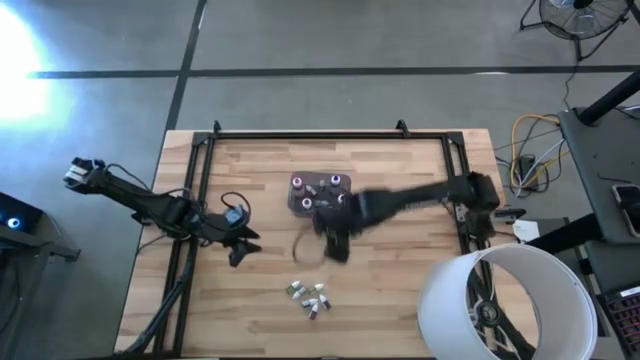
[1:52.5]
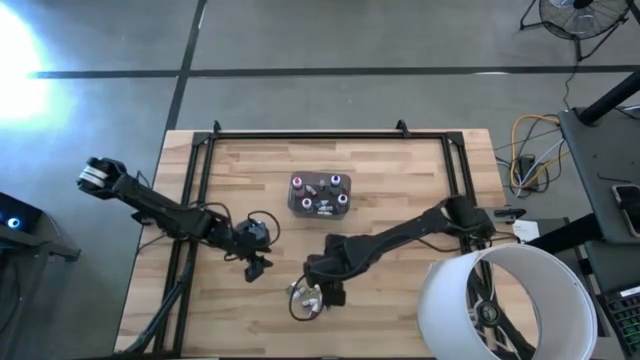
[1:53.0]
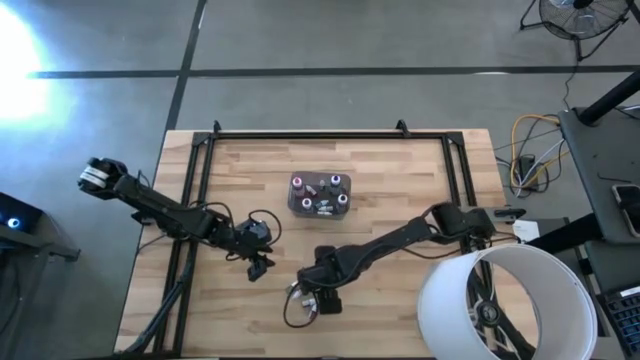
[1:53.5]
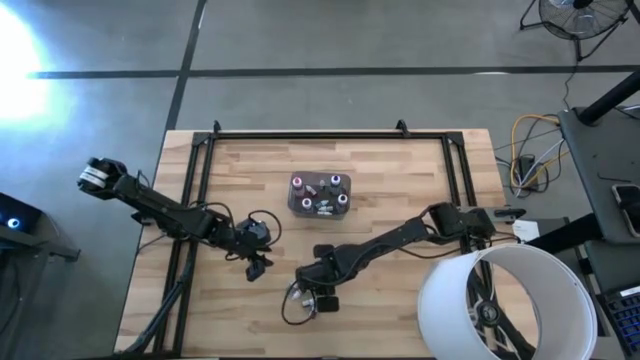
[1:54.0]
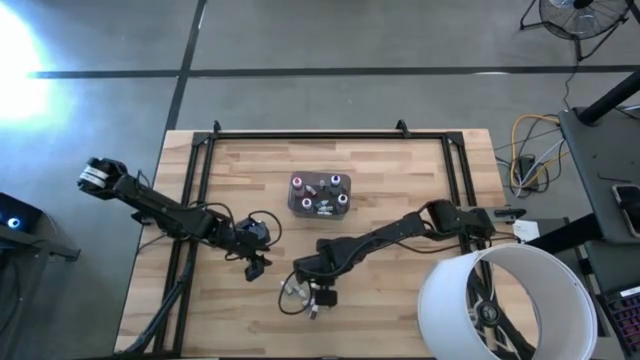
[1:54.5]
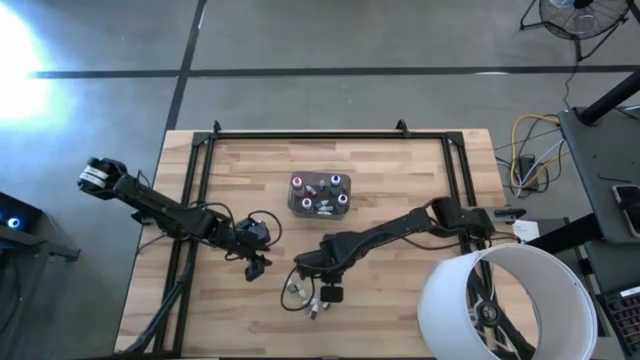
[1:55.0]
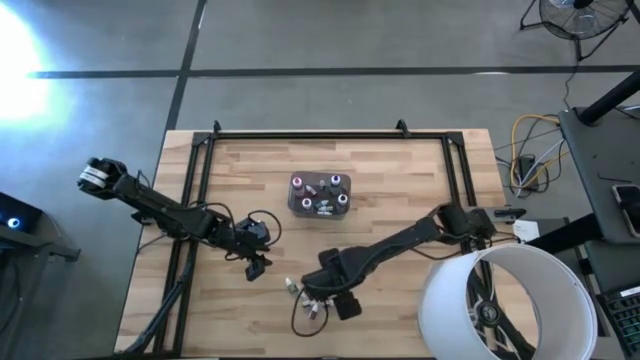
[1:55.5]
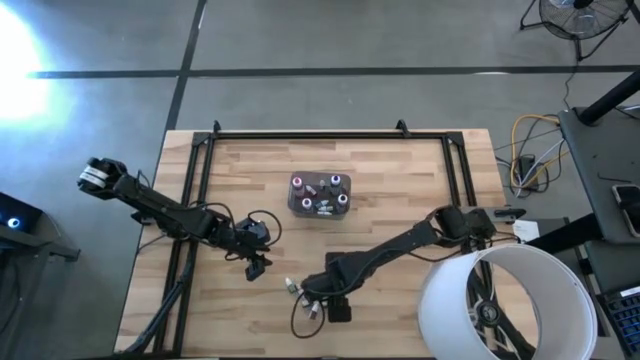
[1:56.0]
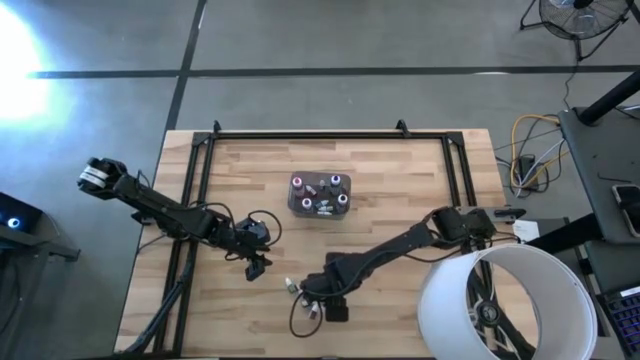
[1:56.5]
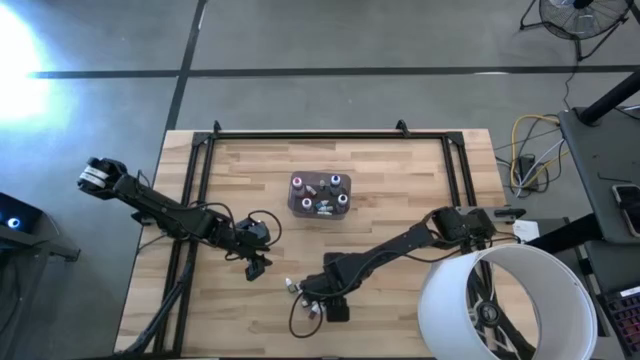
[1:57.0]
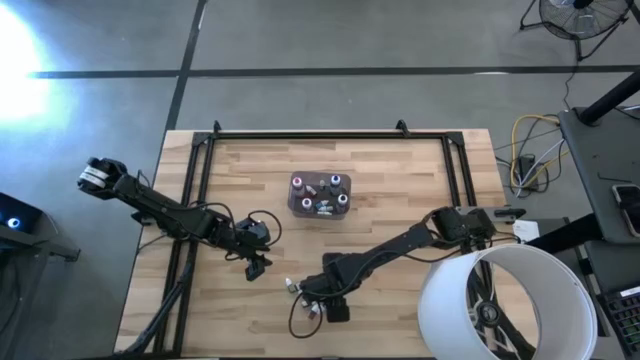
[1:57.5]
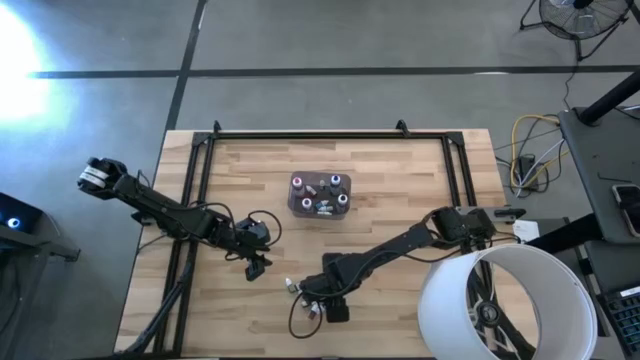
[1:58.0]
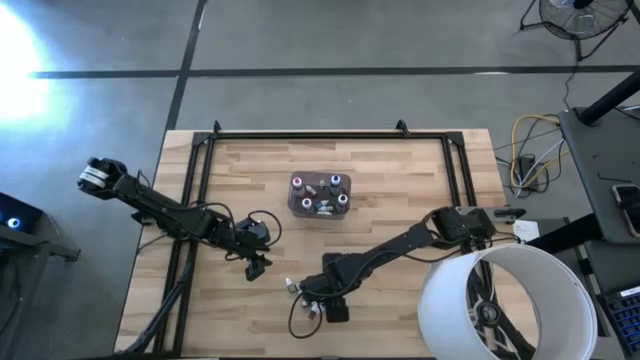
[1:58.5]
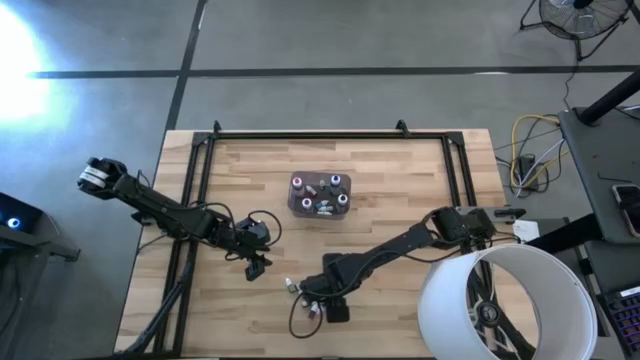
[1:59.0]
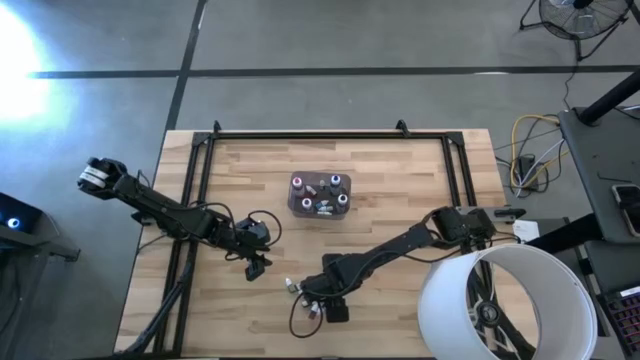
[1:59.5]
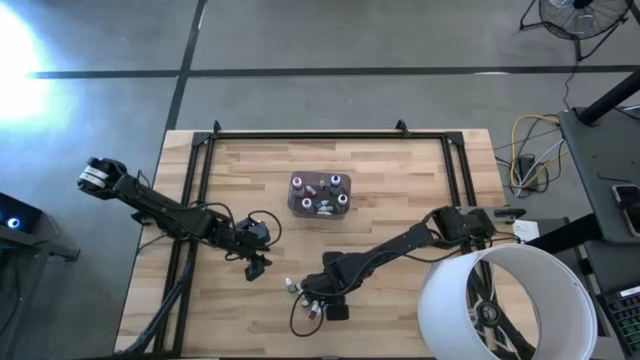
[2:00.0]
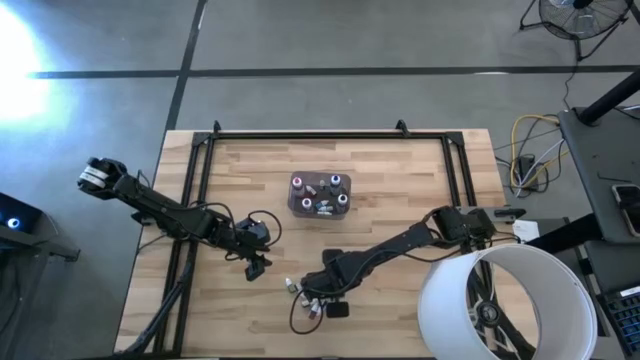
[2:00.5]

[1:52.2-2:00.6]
Task: Pick & Place food coloring
Put the right small green food coloring bottle into the black bin

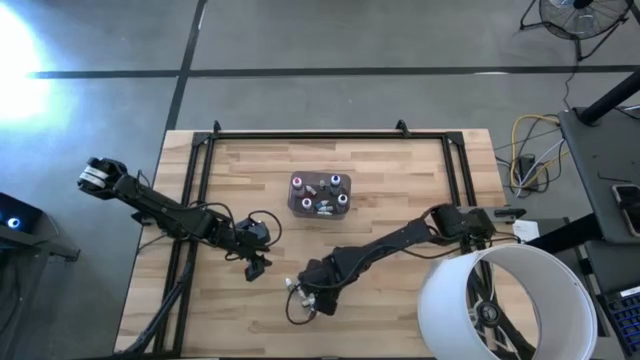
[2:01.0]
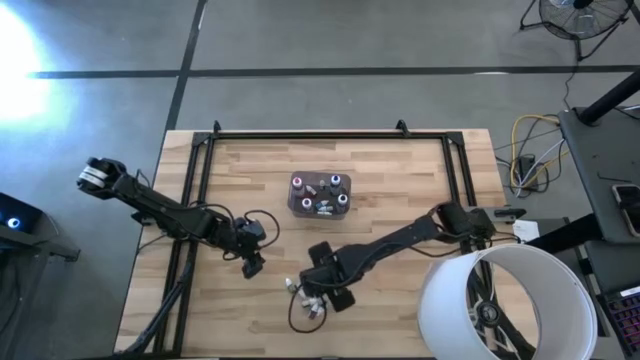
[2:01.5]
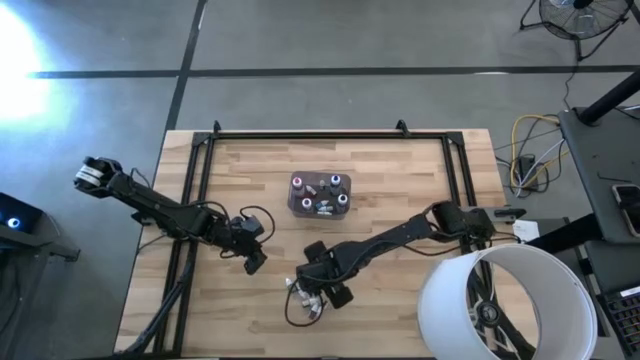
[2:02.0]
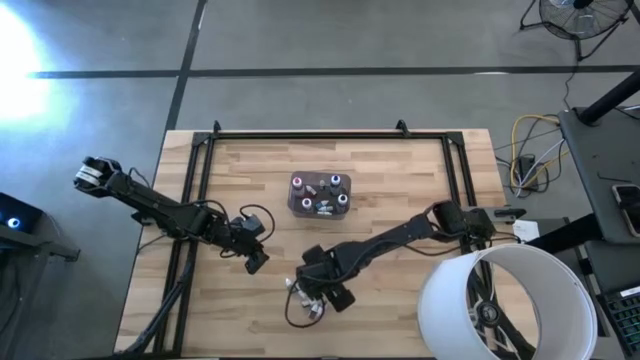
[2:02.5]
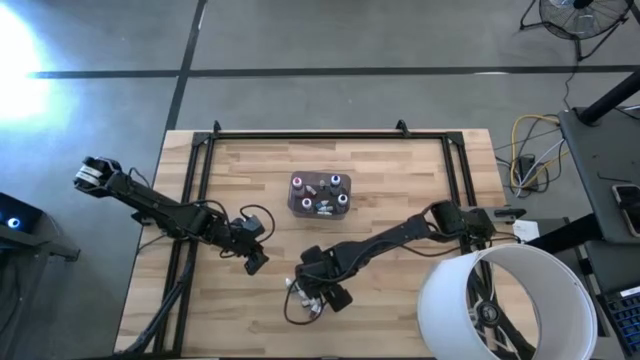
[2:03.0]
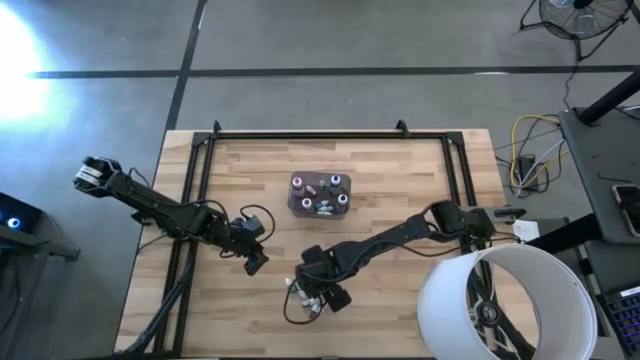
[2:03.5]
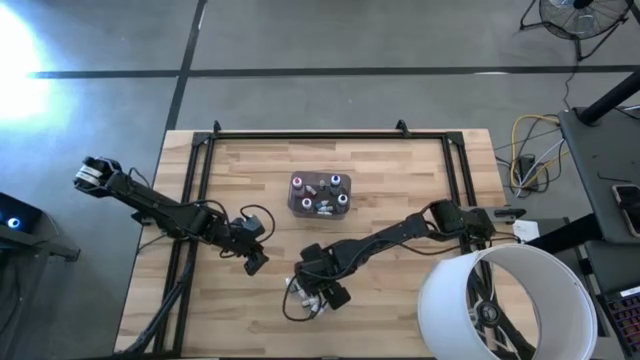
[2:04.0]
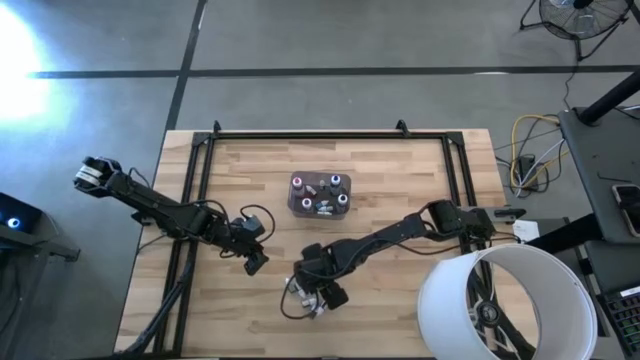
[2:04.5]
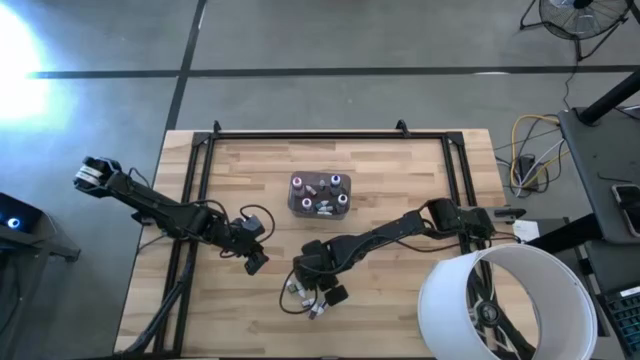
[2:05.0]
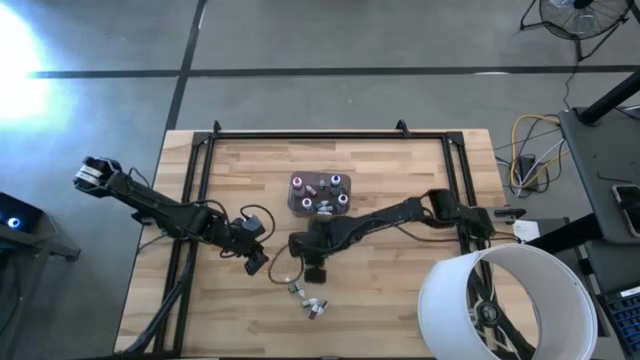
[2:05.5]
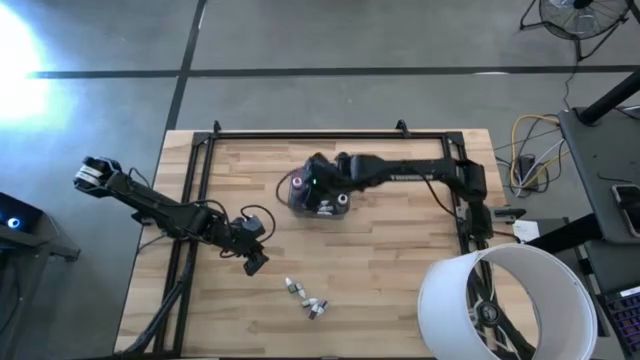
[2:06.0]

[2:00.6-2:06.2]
Put the right small green food coloring bottle into the black bin

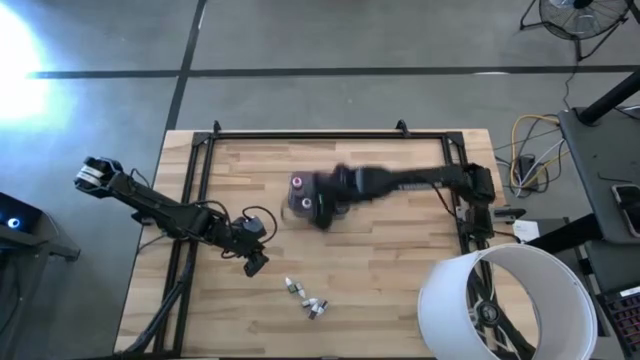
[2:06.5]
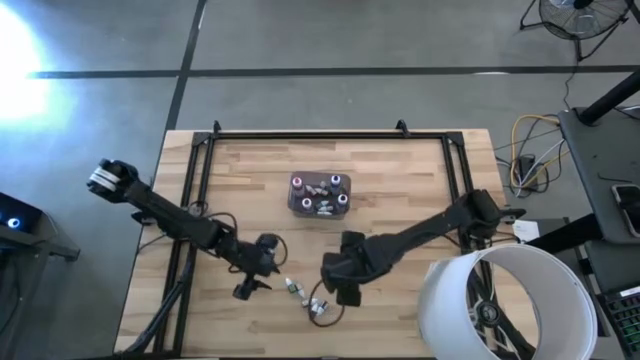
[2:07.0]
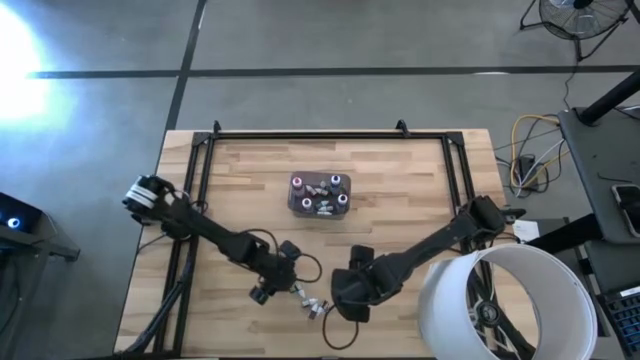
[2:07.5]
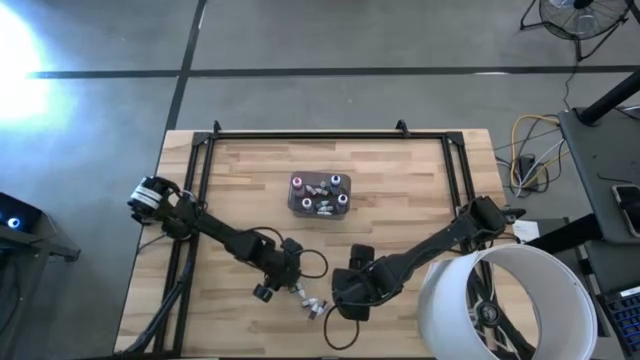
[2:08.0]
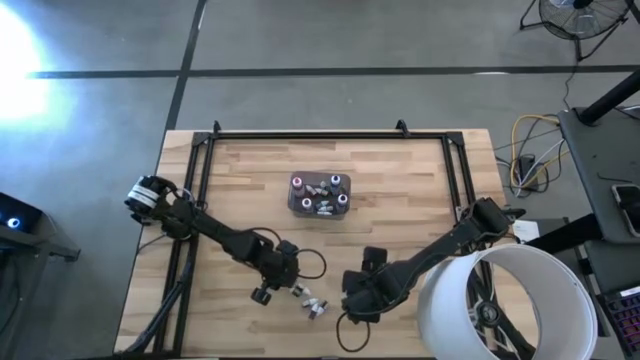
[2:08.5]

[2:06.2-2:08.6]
Put the small green food coloring bottle into the black bin

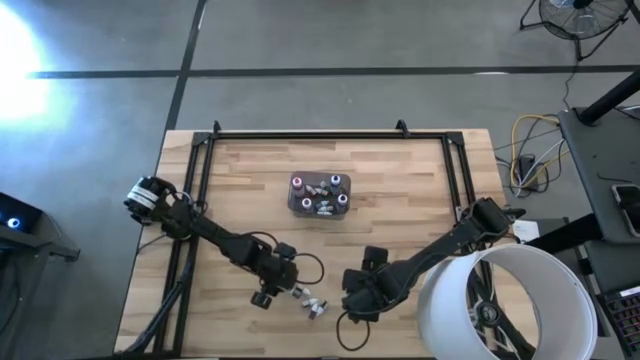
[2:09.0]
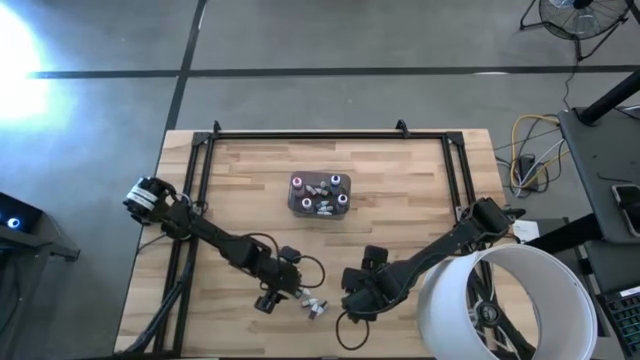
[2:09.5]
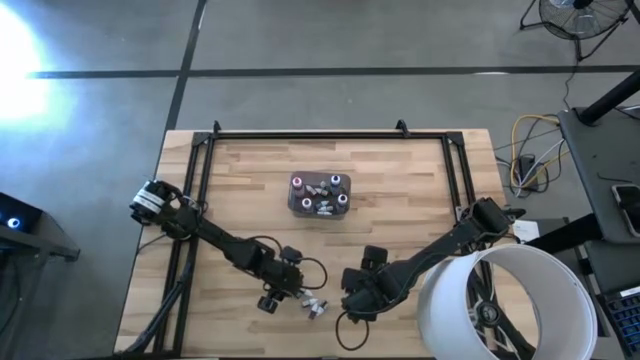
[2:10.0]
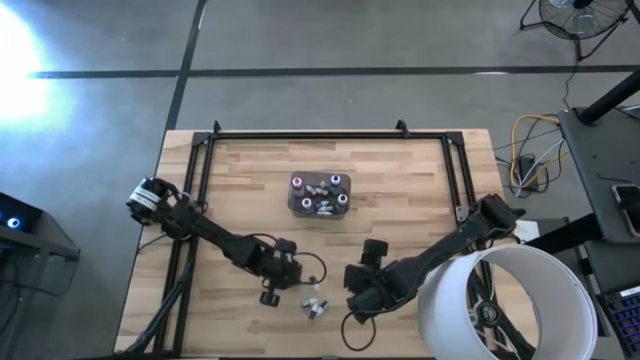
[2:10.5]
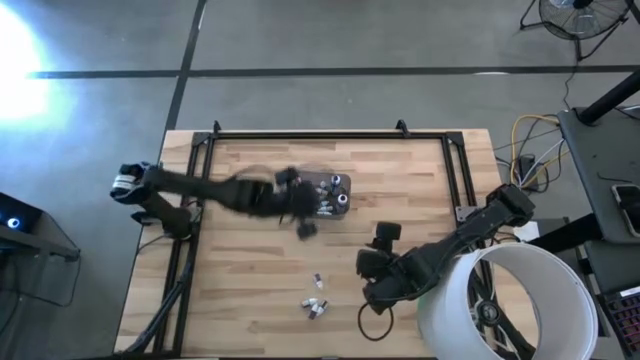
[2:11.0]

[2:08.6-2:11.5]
Put the small green food coloring bottle into the black bin

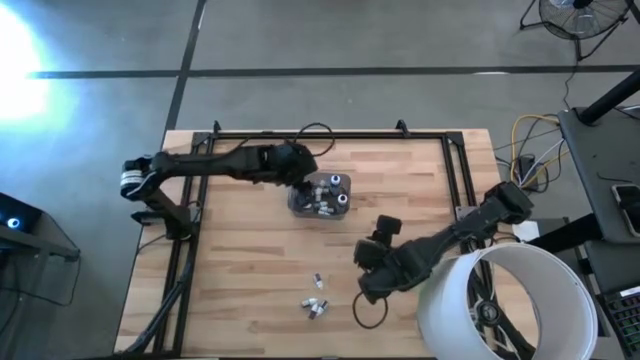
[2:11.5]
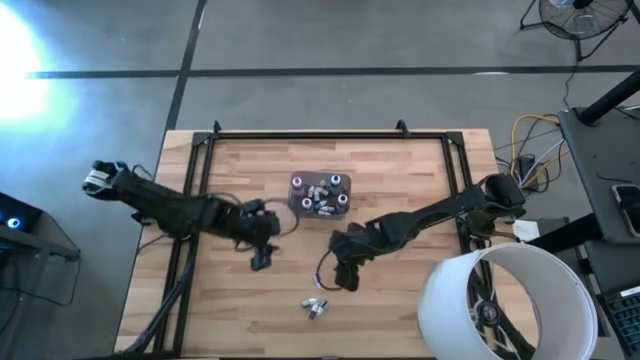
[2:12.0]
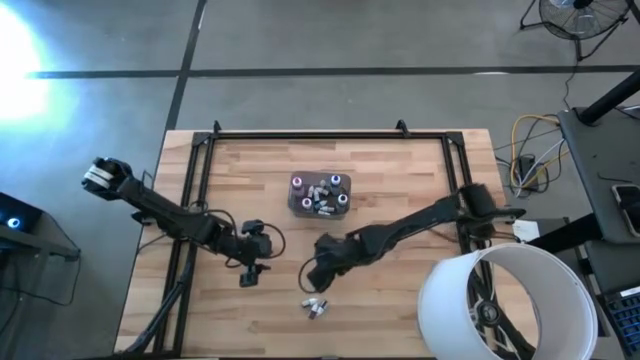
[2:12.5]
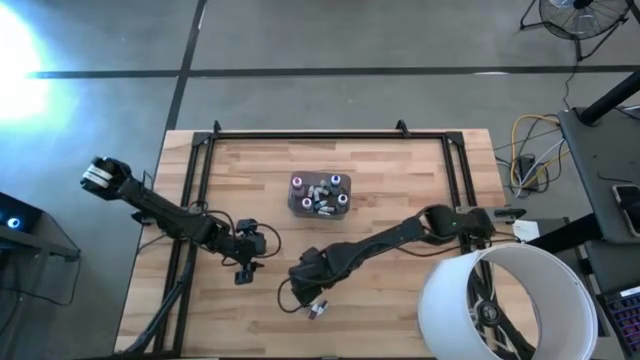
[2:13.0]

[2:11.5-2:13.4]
Put the top small purple food coloring bottle into the black bin

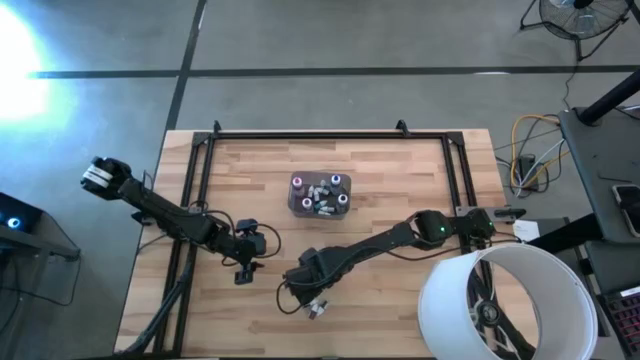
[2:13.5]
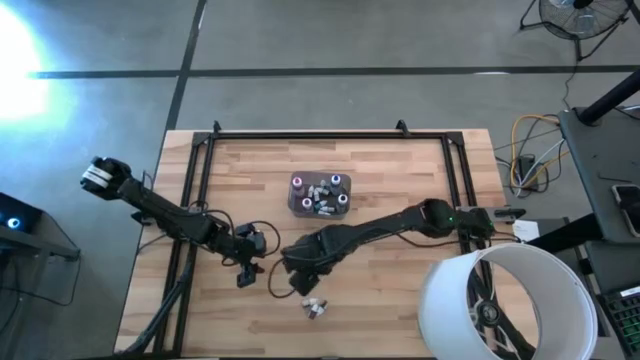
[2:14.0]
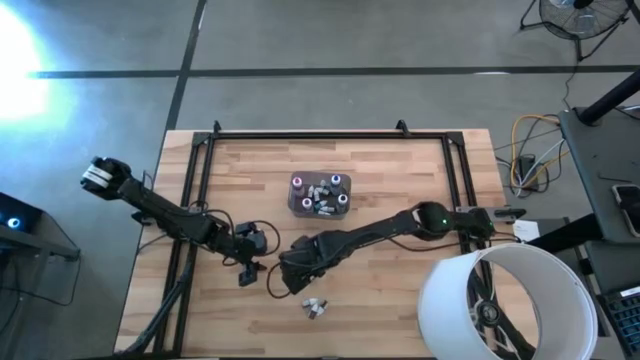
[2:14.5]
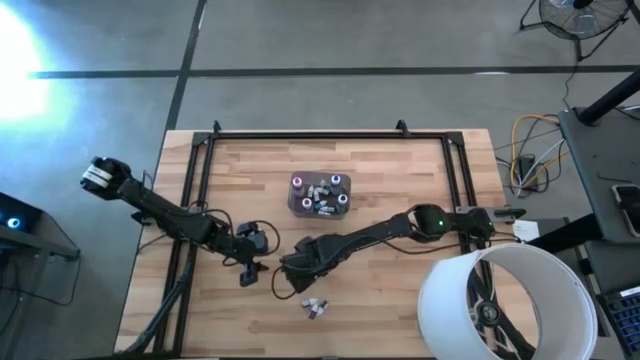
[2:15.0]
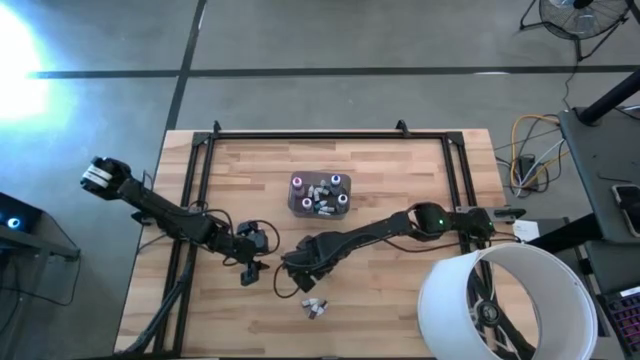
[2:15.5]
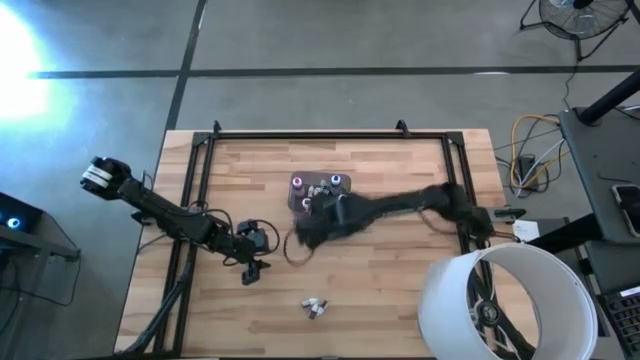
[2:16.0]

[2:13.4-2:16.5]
Put the top small purple food coloring bottle into the black bin
